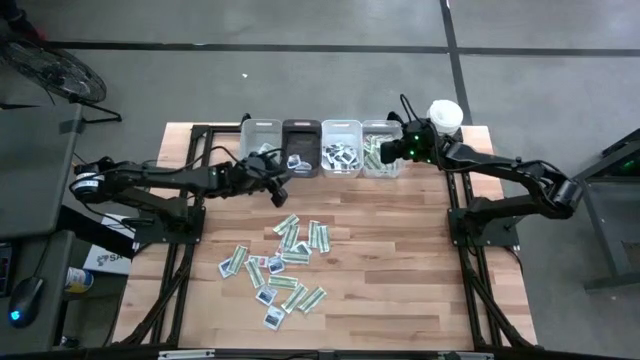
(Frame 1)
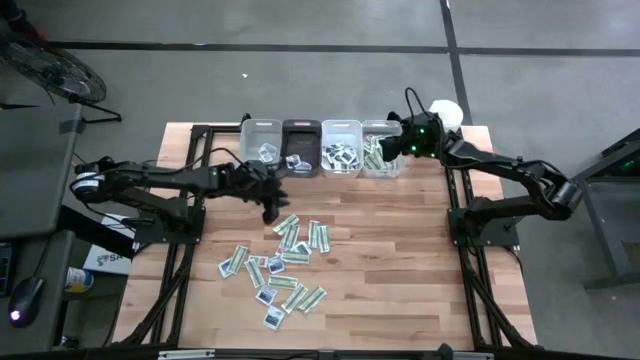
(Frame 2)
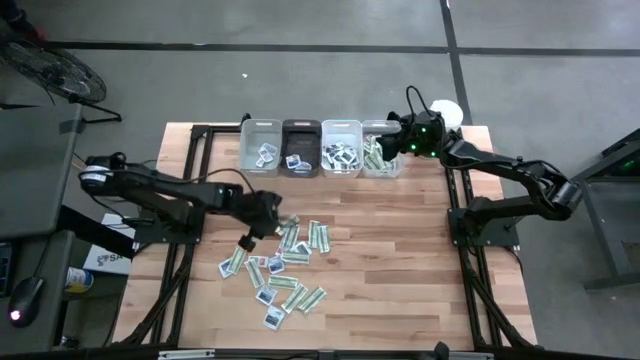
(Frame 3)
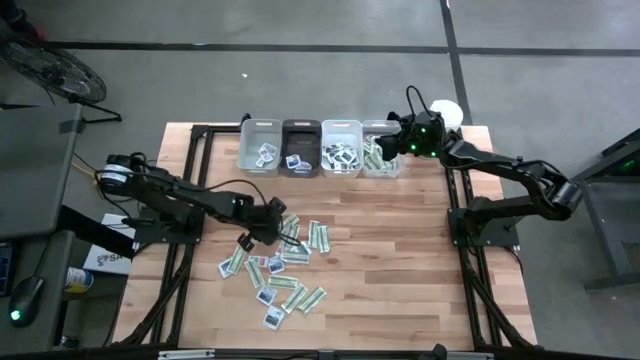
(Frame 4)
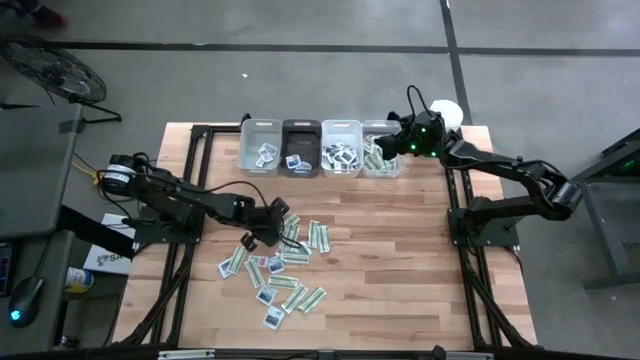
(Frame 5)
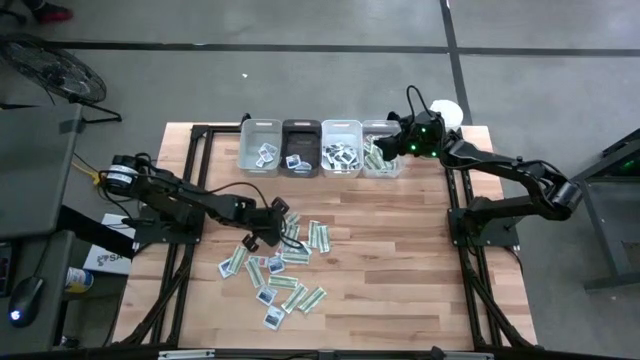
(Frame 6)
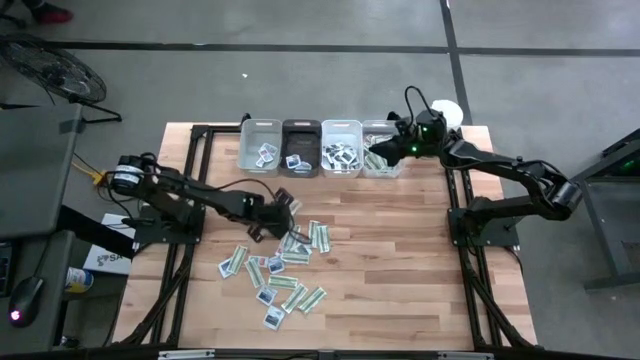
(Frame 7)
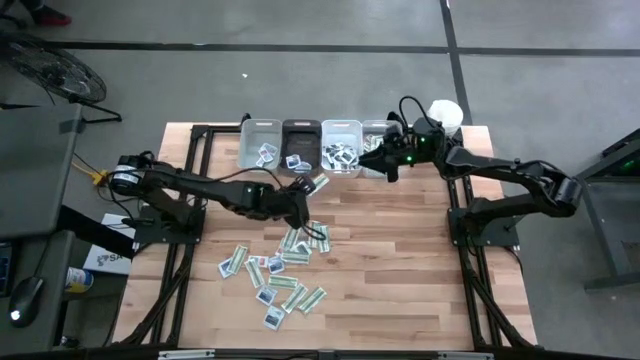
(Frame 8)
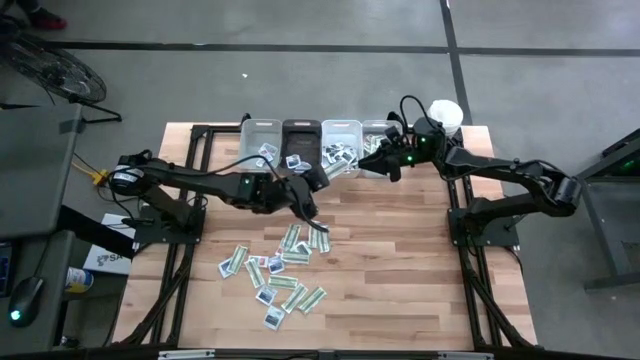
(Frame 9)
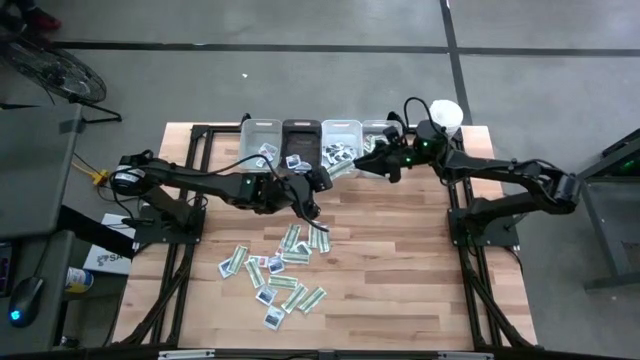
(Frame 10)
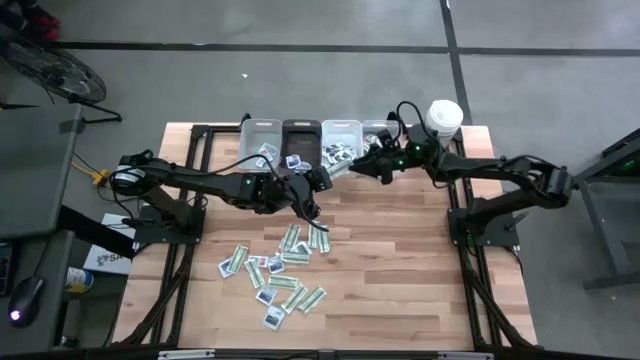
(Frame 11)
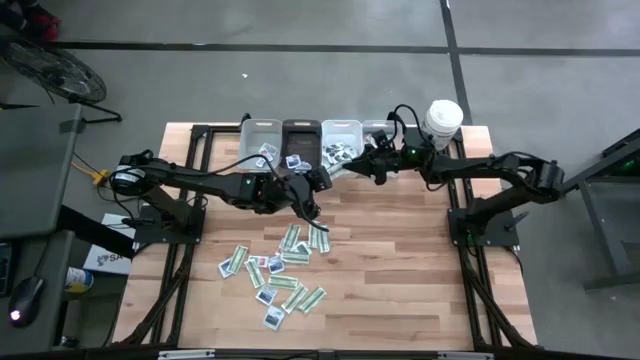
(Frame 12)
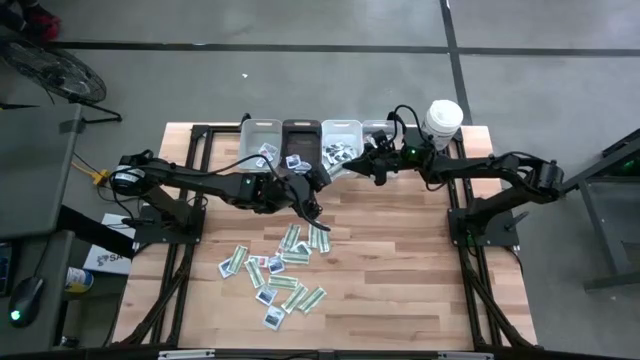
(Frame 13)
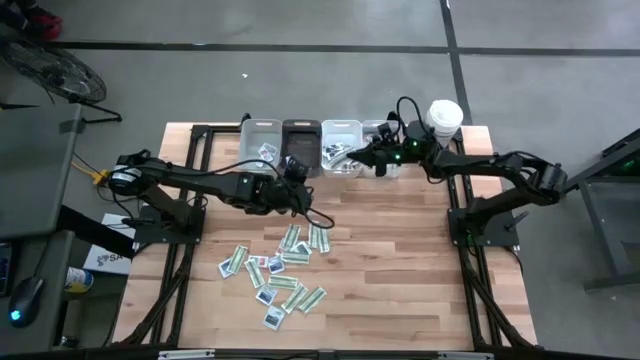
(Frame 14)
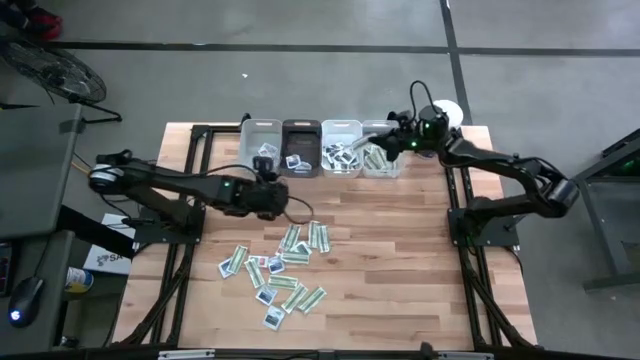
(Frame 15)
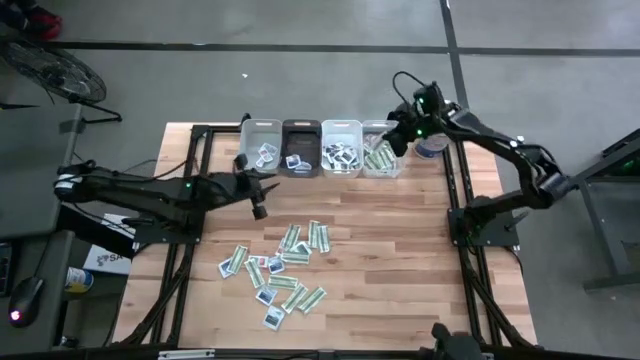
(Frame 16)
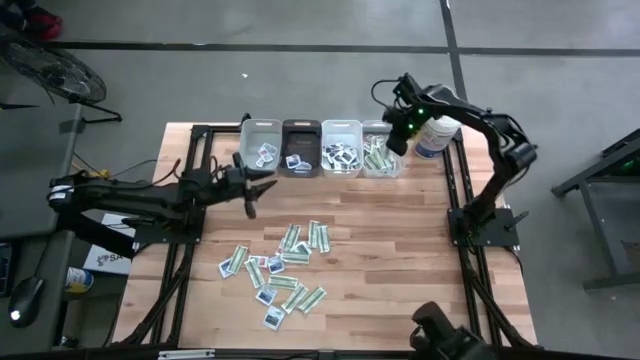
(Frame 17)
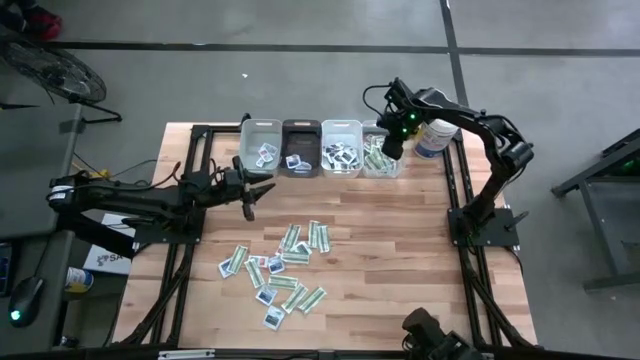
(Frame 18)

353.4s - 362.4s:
Task: Pick & Place First Aid Supplies
Put the green bandage into the transparent bin

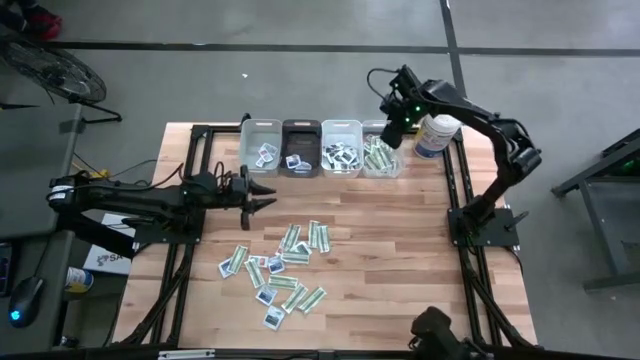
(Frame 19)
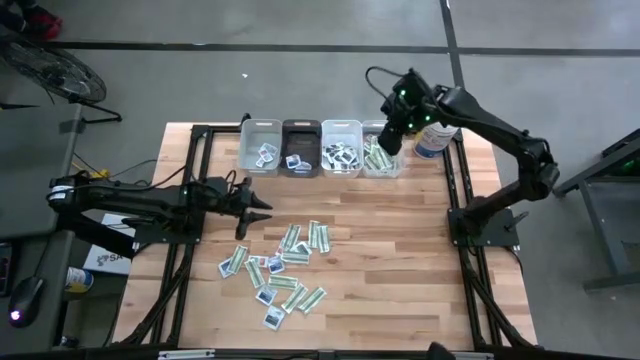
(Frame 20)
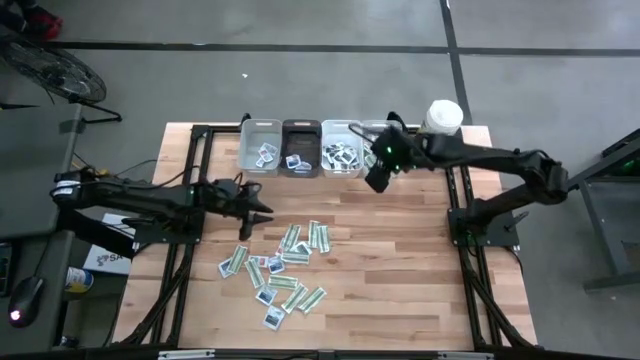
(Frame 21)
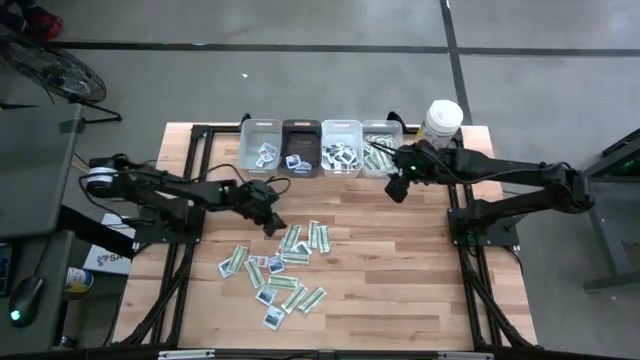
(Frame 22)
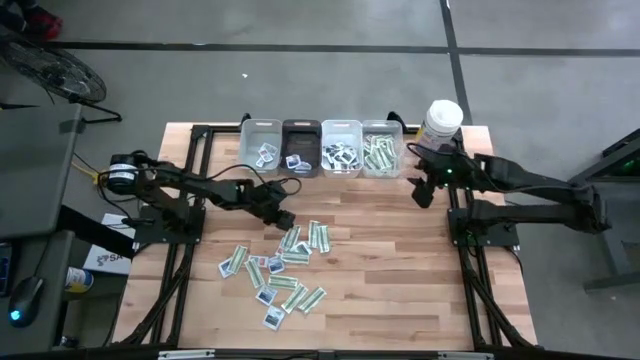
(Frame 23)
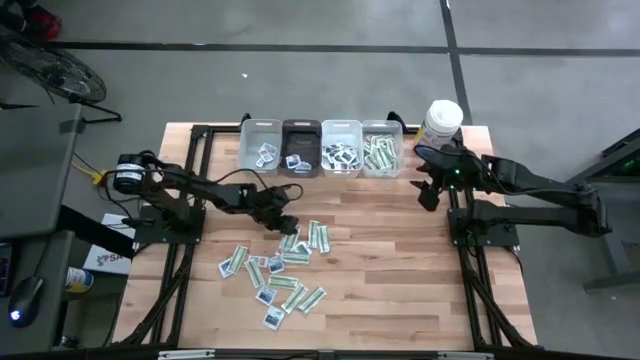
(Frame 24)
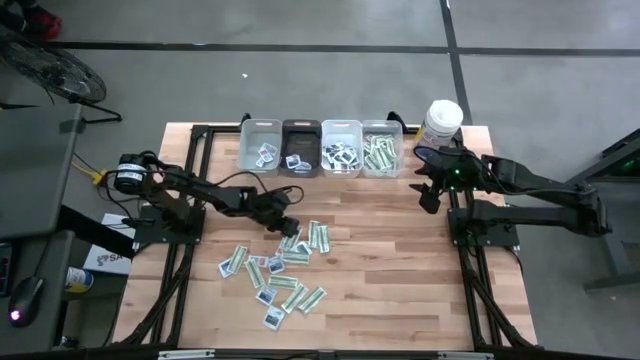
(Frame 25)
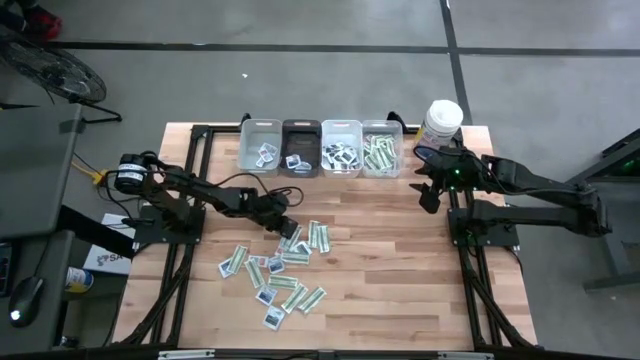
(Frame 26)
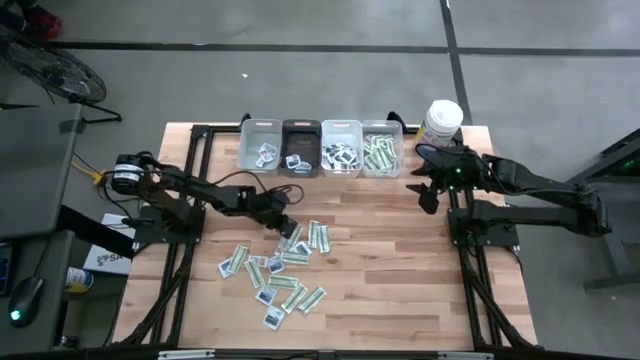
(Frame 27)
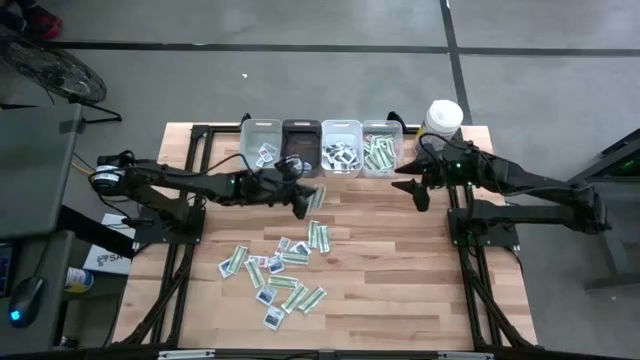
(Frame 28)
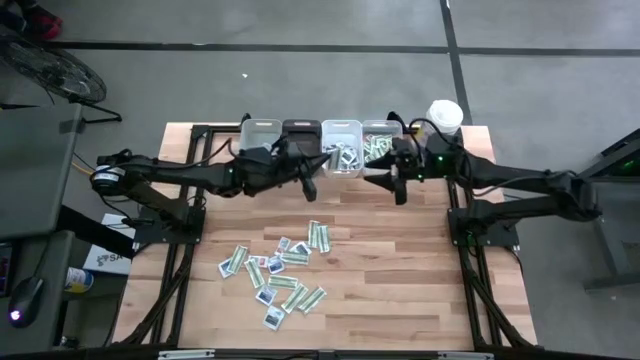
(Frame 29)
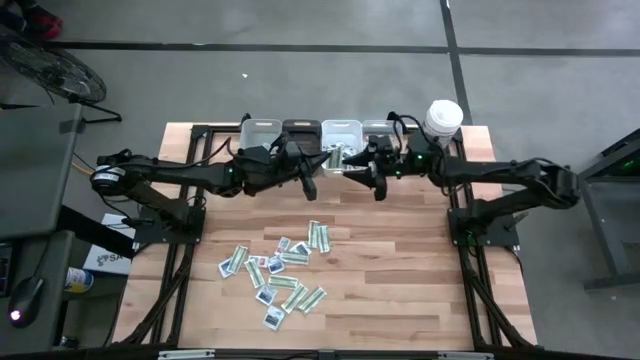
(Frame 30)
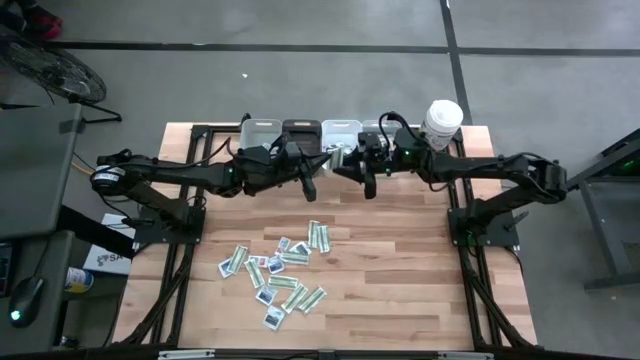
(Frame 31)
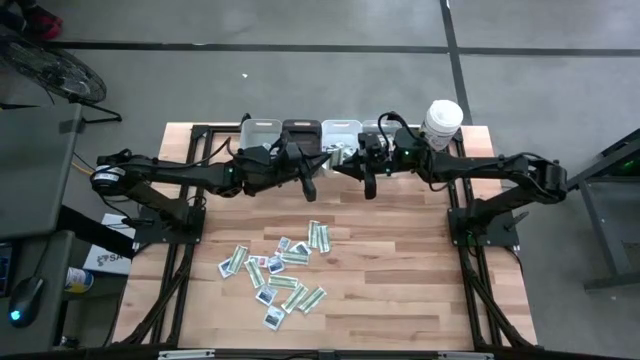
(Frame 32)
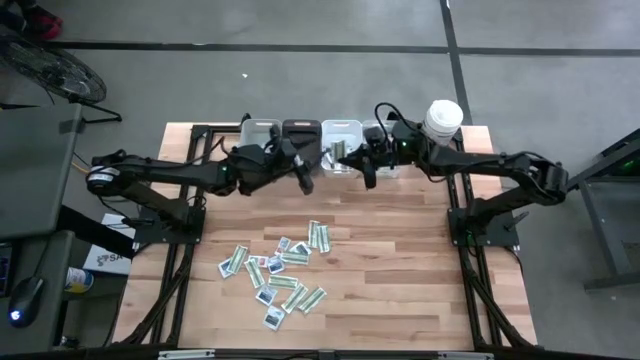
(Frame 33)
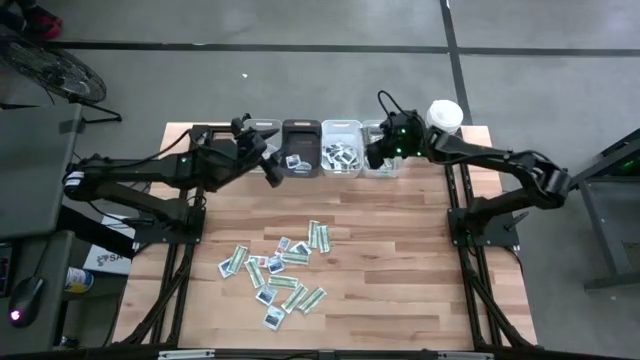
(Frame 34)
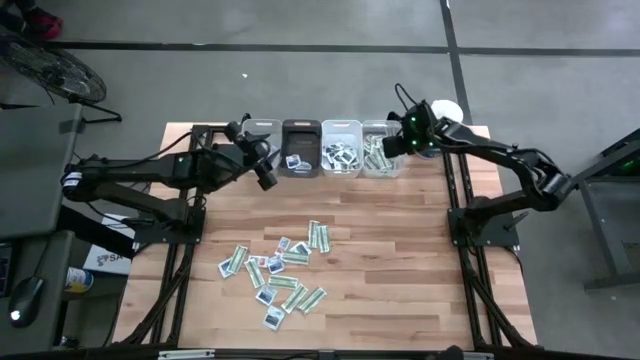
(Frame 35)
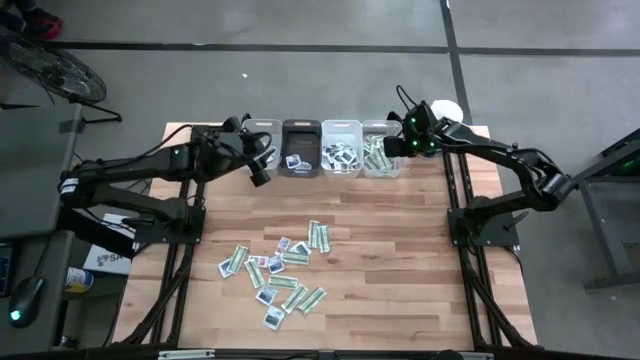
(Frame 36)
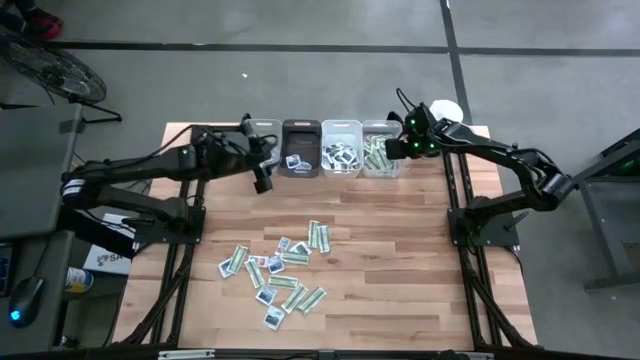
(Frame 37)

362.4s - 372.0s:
Put the green bandage into the transparent bin

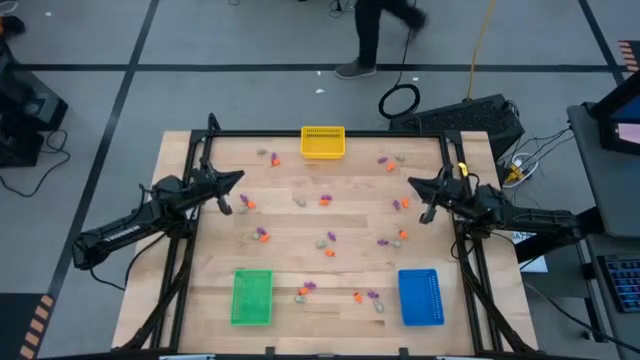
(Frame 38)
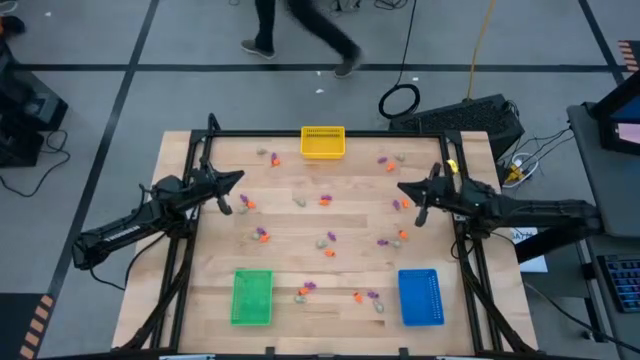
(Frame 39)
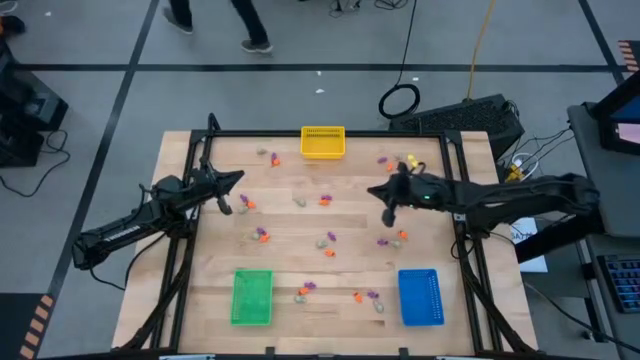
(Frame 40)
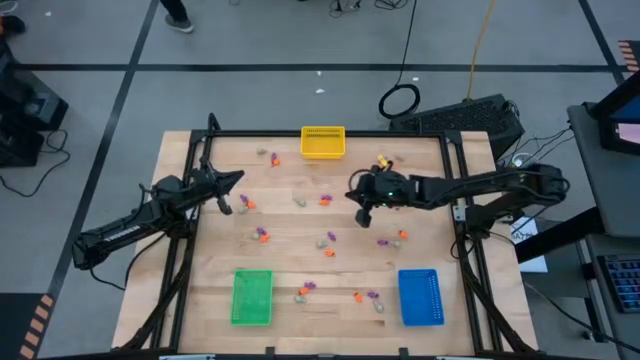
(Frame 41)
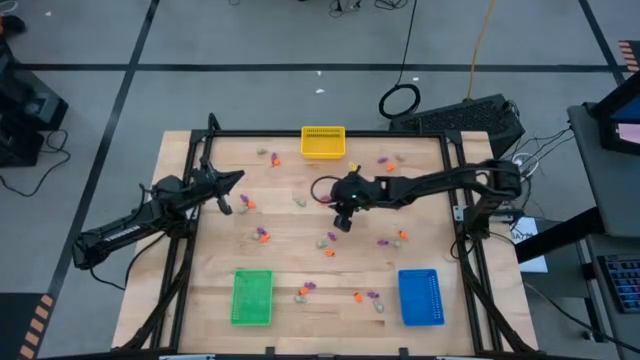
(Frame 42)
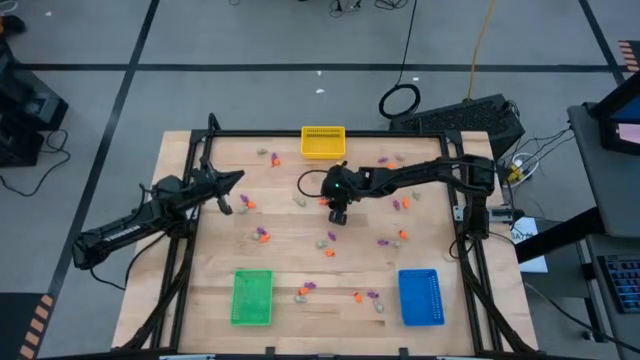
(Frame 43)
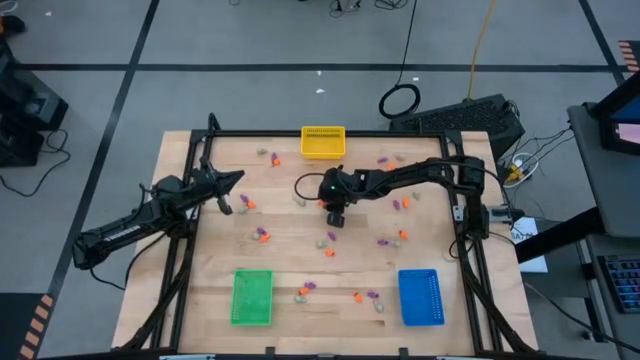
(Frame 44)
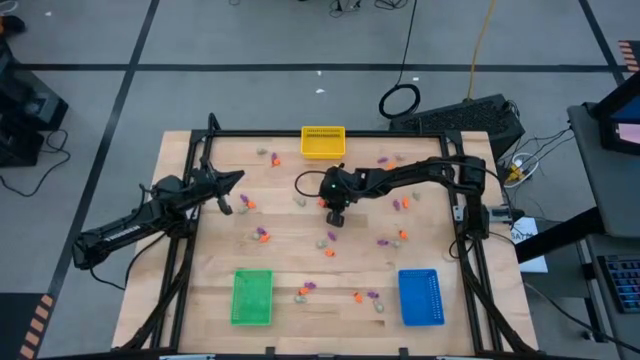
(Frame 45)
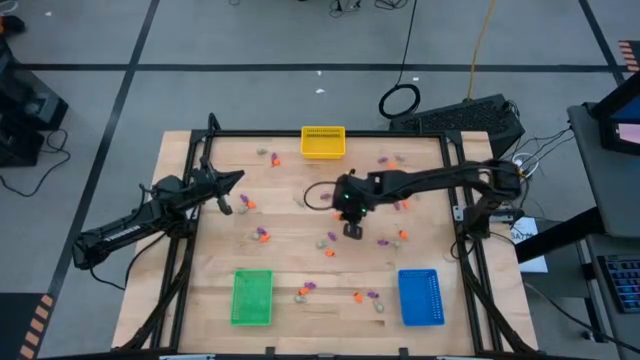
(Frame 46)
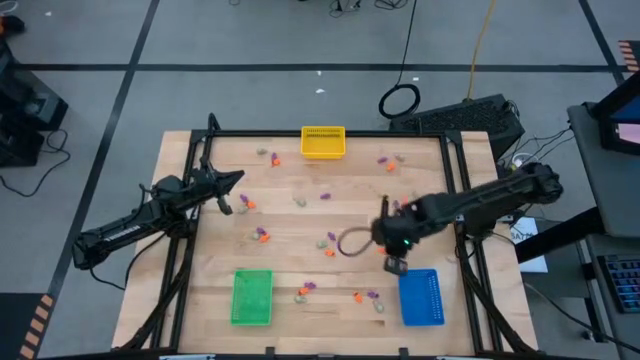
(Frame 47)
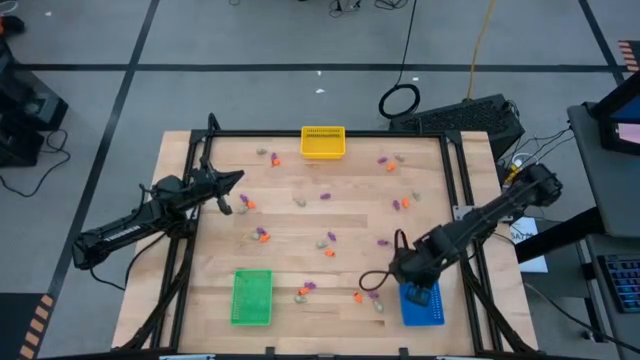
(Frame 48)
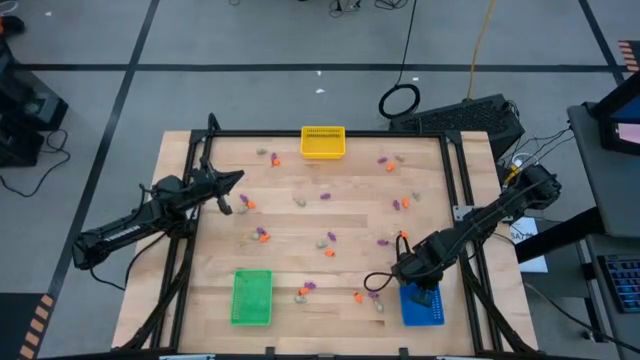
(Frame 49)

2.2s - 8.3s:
Task: Sort Halloween decoration
Put the orange skeleton toy into the blue bin
